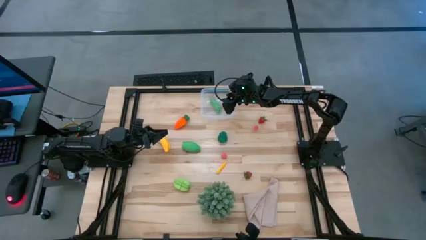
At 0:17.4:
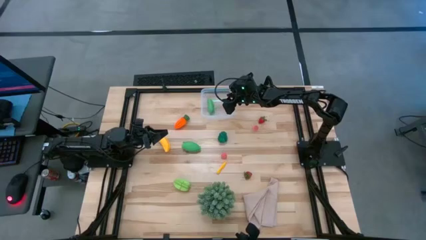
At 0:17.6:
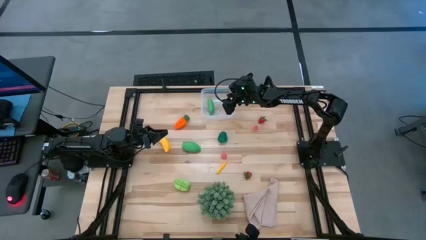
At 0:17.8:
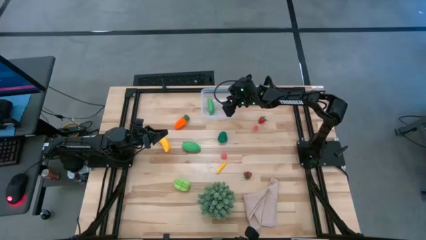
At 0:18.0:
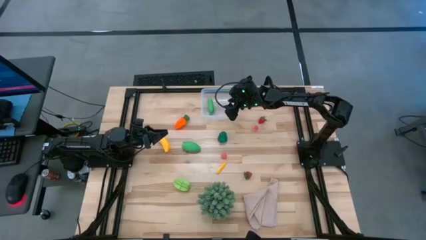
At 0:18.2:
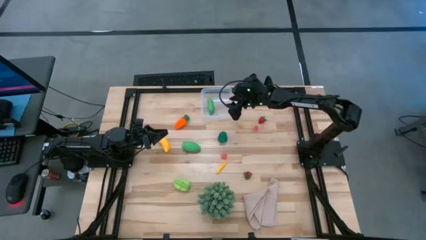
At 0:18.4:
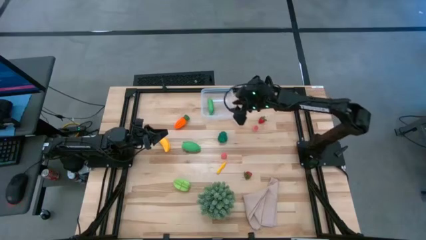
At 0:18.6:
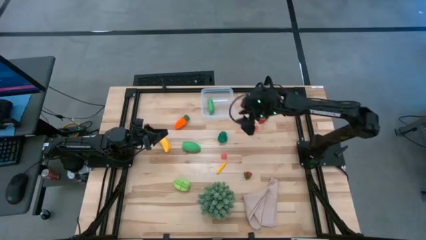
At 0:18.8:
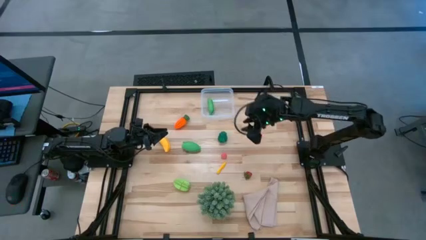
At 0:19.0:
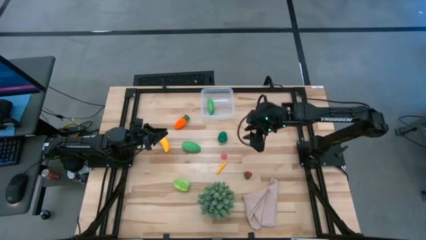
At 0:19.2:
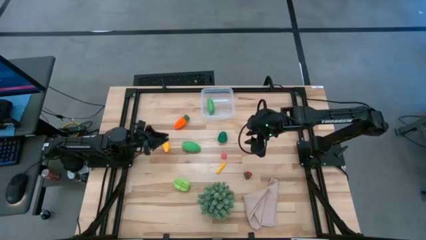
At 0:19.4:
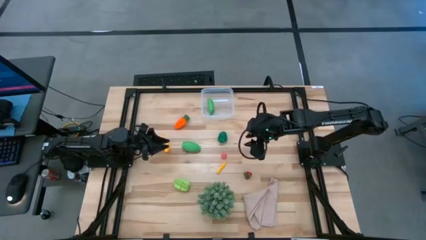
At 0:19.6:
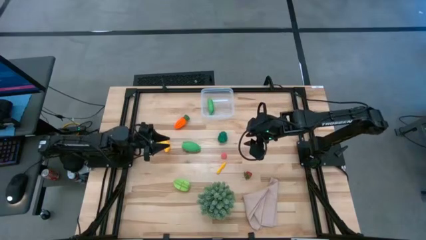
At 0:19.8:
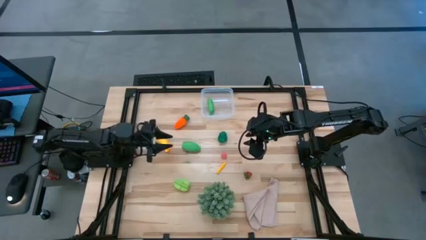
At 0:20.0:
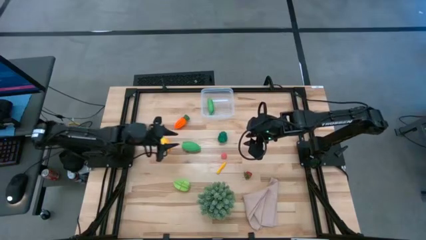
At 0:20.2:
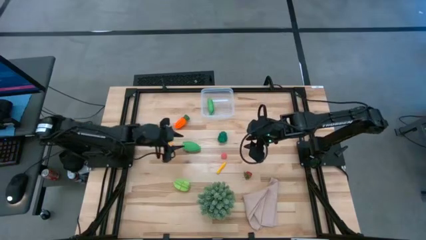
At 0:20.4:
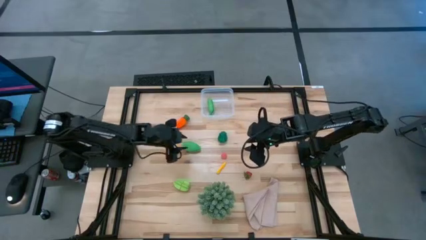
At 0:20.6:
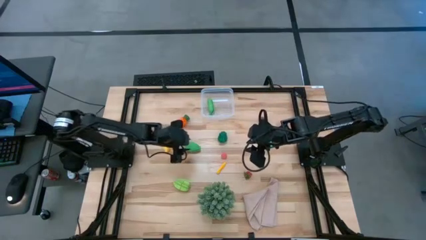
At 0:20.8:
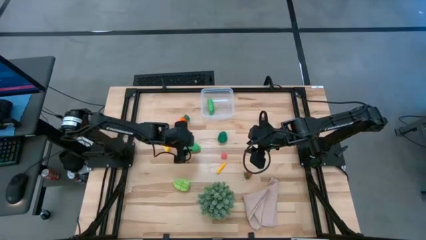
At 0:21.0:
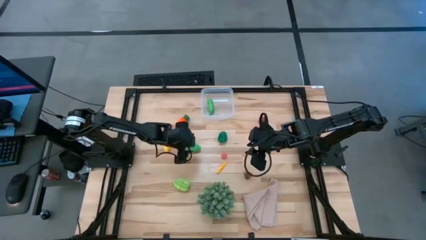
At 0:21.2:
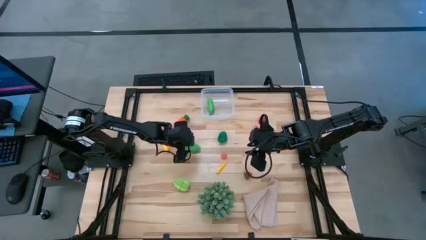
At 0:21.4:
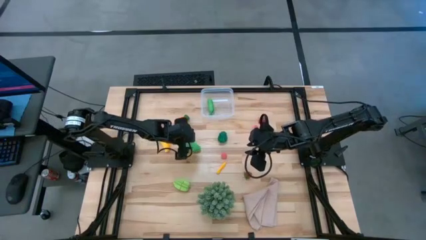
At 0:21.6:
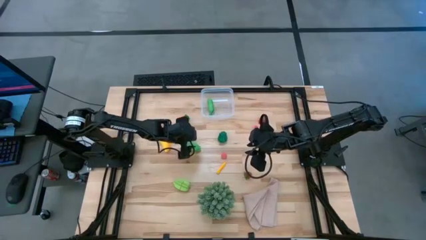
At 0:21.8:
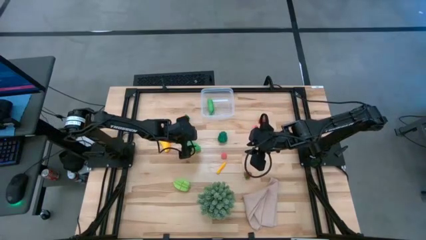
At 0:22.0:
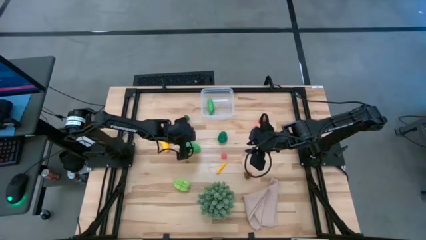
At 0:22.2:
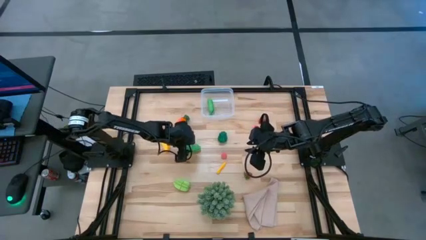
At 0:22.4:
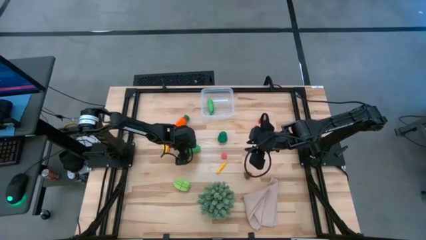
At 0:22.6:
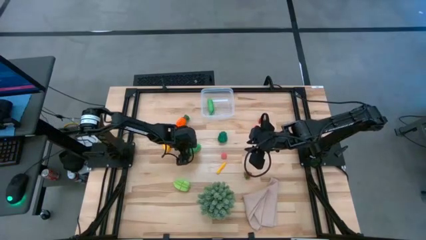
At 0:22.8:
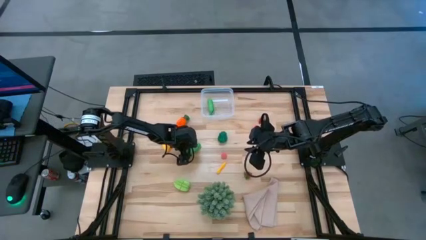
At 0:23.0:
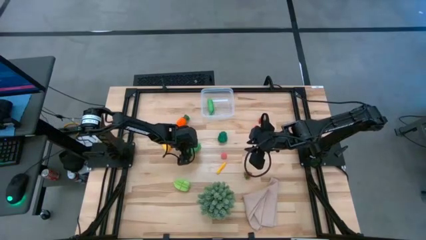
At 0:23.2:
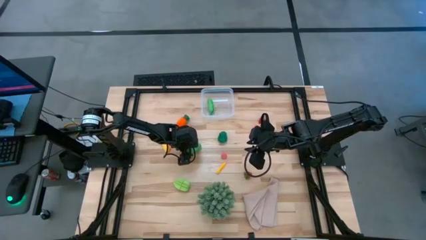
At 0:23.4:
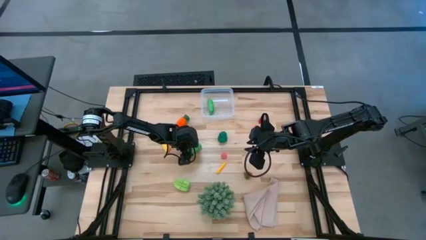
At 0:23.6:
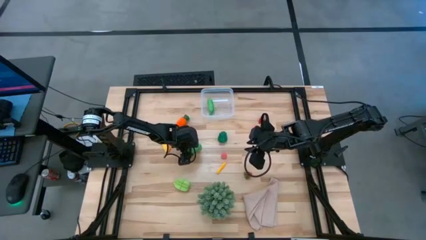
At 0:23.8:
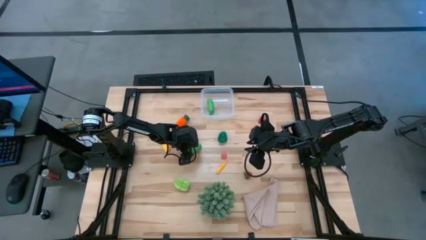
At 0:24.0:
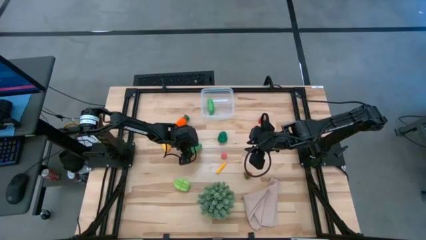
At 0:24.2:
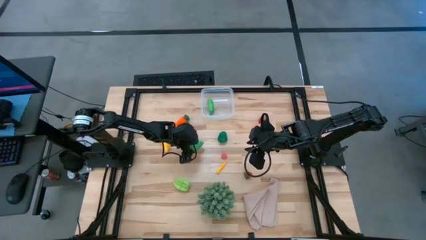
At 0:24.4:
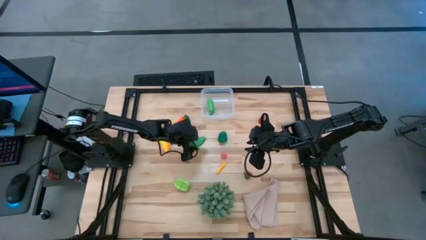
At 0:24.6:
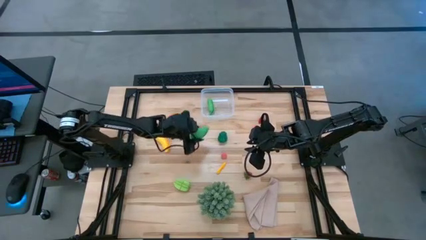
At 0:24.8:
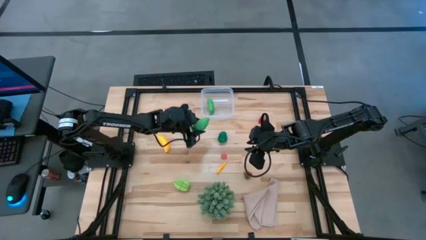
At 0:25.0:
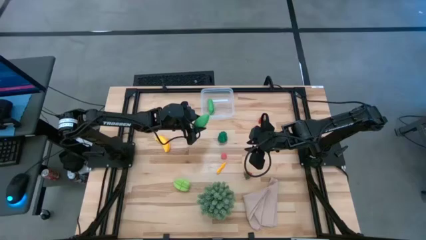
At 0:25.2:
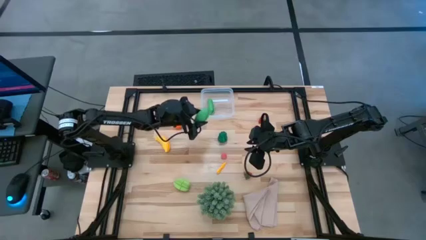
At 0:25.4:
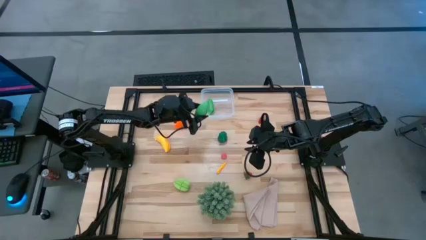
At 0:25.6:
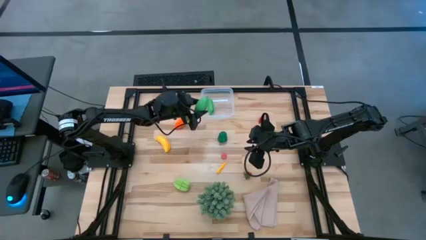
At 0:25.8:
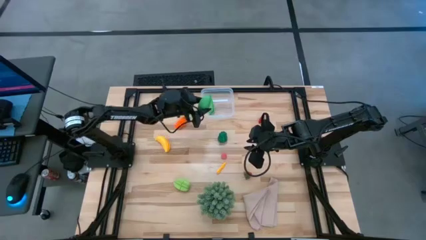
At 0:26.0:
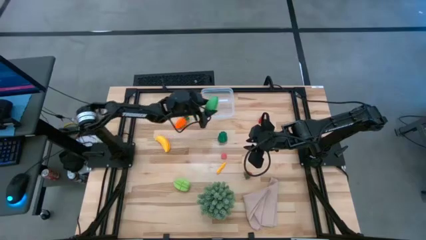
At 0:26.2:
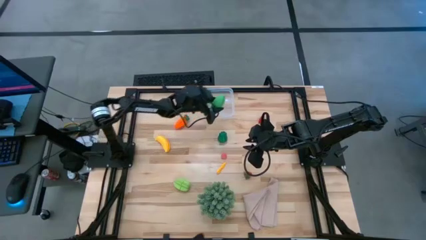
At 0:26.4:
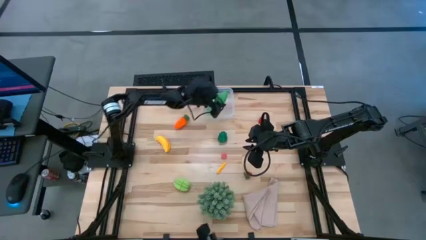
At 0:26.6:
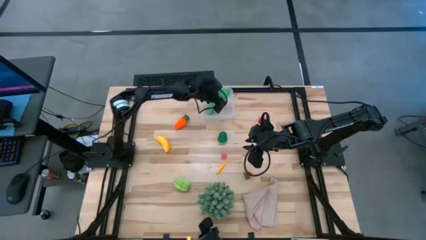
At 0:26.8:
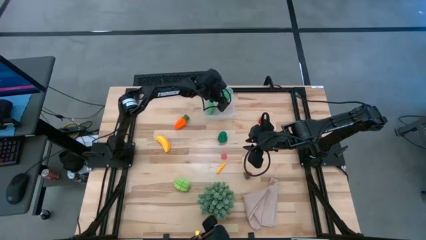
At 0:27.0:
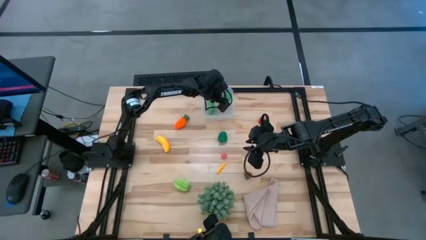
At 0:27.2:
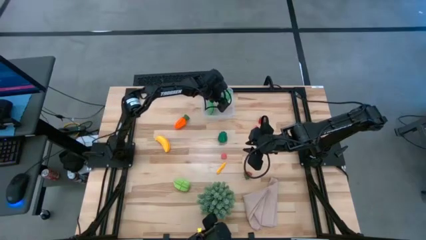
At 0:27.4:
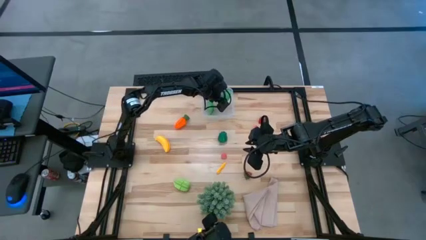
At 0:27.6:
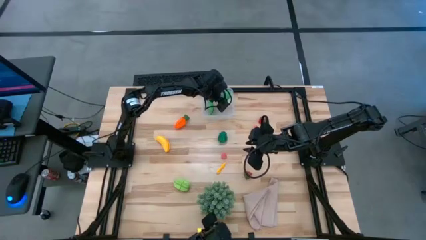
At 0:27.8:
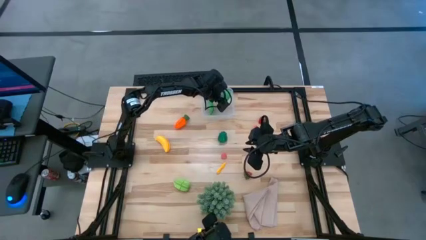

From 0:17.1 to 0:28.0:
Task: Pick and placing Produce into tupperware
Put the top corn into the transparent bin
